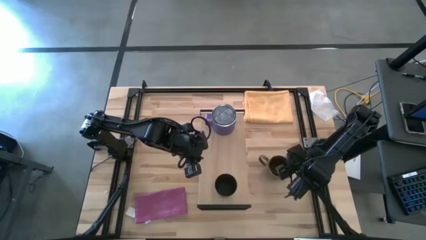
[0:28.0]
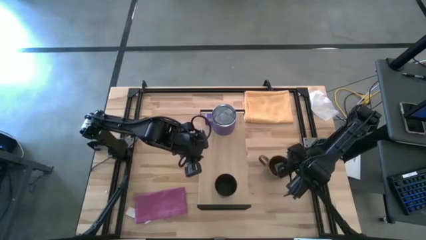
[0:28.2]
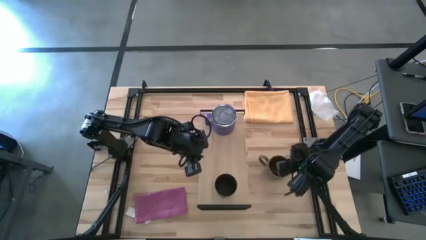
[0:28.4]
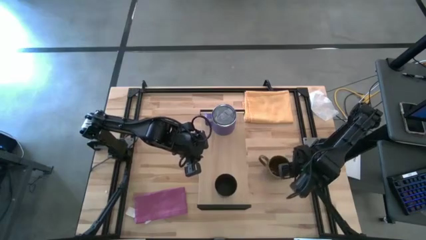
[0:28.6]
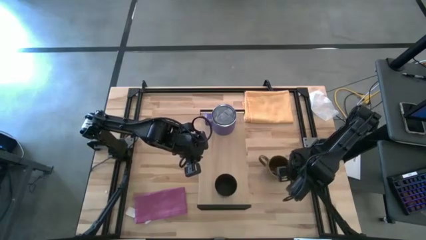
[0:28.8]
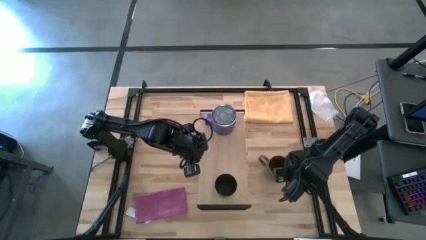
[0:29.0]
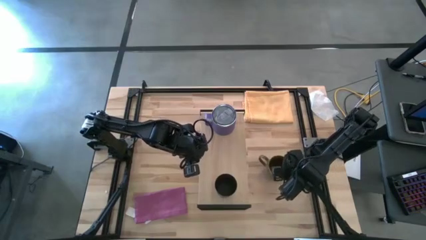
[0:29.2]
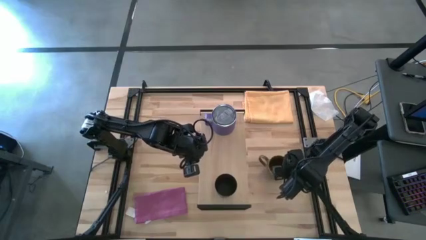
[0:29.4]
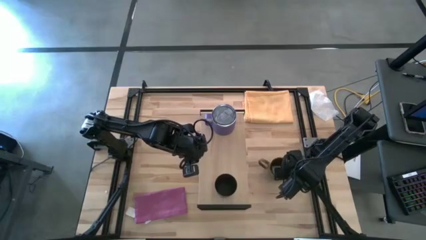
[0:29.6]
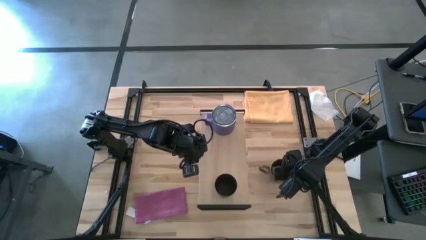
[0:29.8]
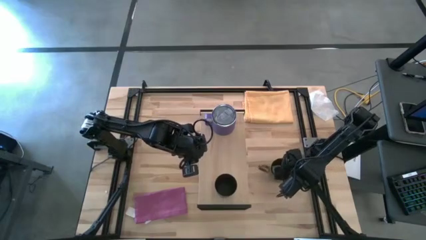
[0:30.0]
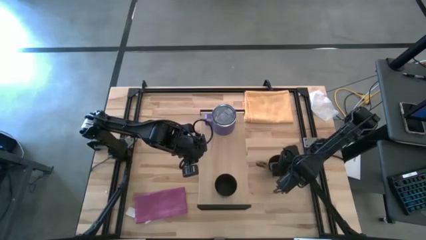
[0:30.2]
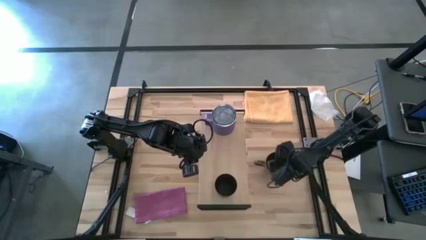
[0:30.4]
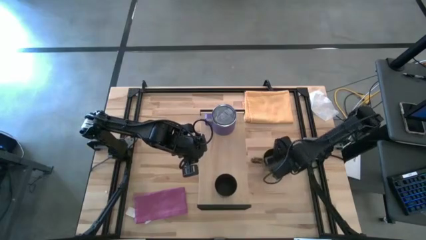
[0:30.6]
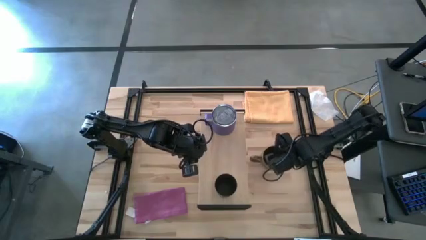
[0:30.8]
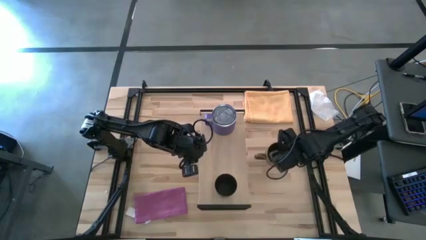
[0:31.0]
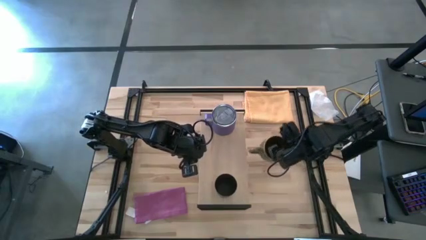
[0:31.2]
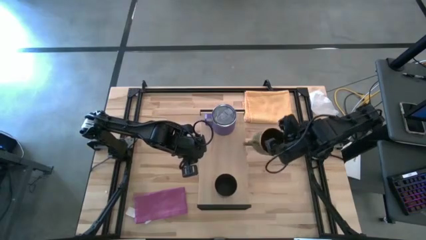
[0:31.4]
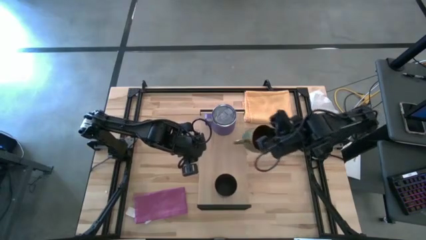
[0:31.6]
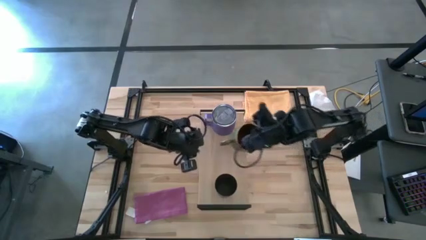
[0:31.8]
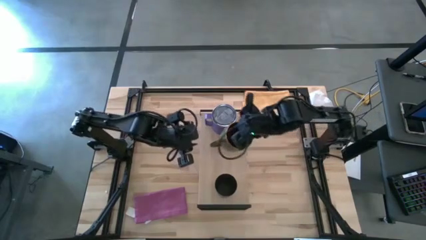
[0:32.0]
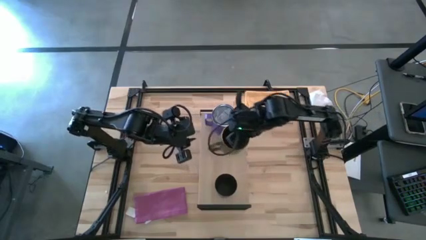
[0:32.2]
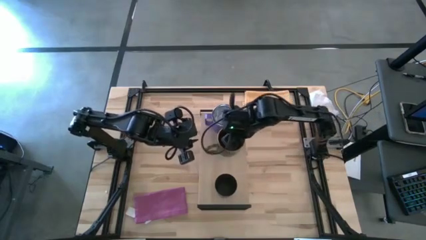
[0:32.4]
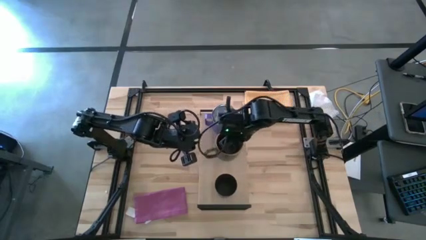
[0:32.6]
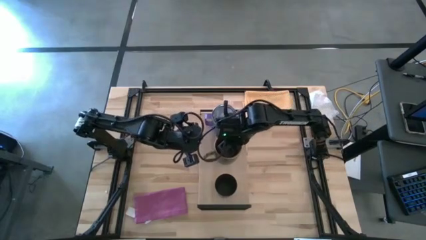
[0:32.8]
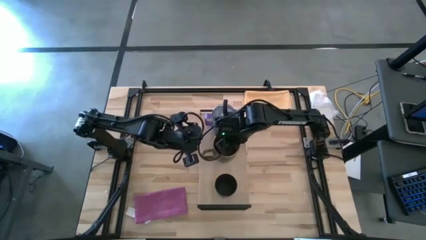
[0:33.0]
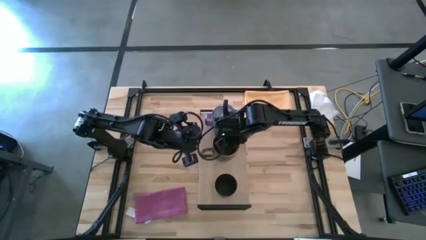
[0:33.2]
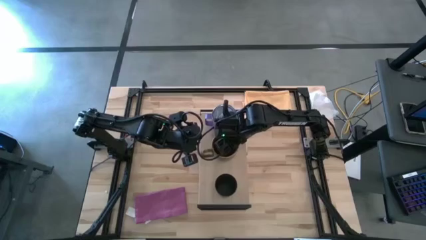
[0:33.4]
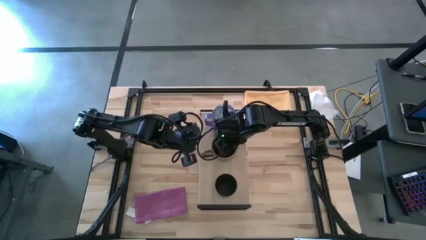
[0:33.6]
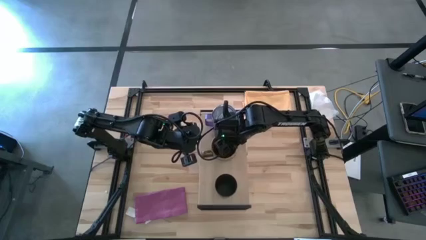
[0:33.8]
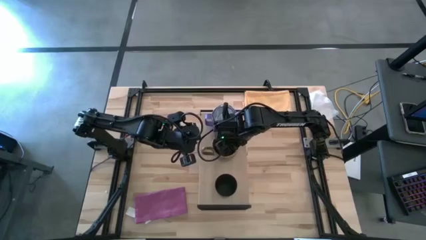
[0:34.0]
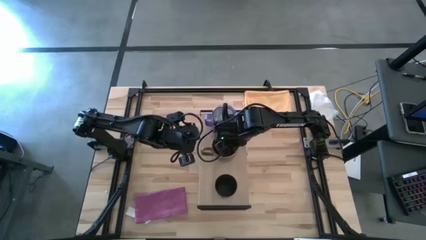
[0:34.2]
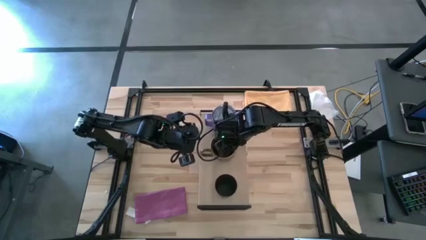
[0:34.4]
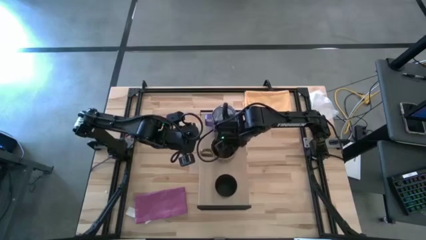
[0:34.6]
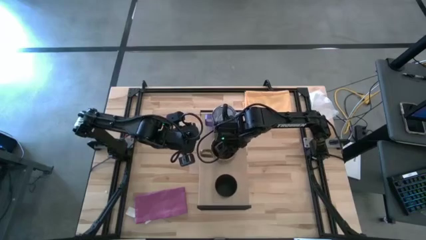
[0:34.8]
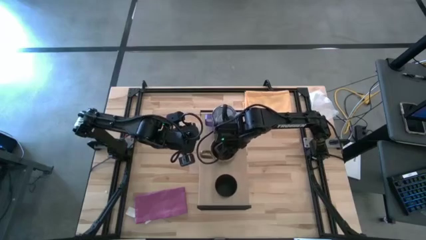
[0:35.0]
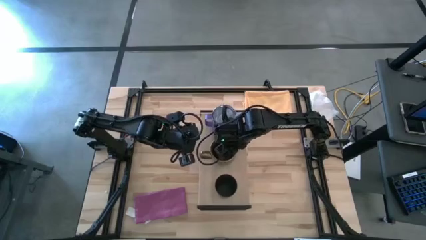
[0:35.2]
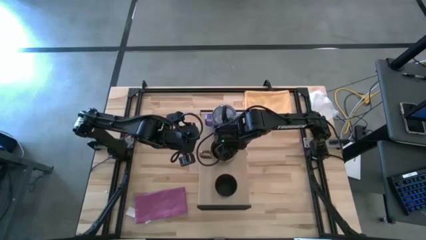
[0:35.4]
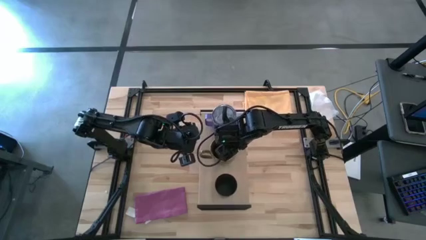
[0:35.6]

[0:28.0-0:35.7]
Task: Stack small to large cups/mugs on shelf
Put the green mug on the shelf

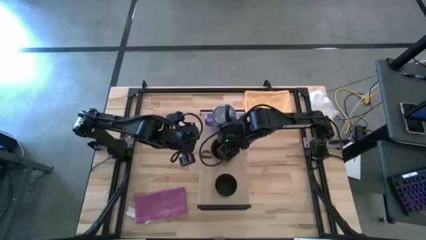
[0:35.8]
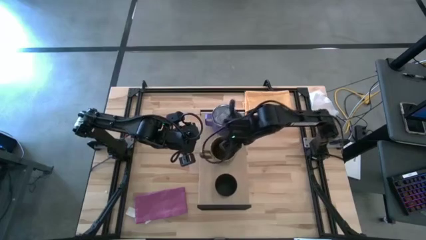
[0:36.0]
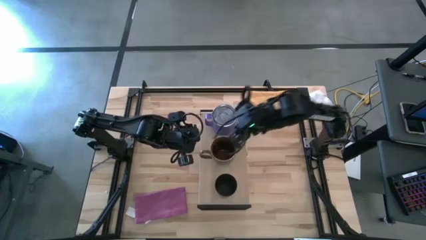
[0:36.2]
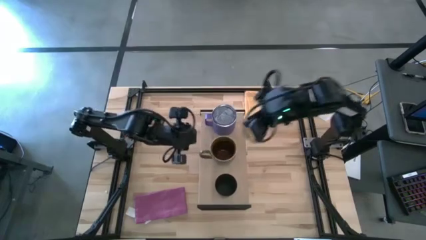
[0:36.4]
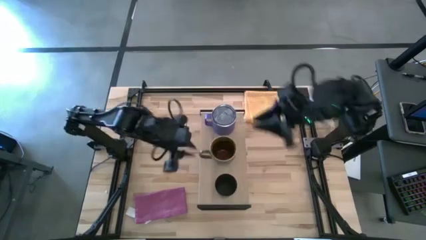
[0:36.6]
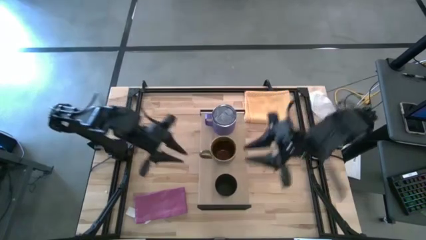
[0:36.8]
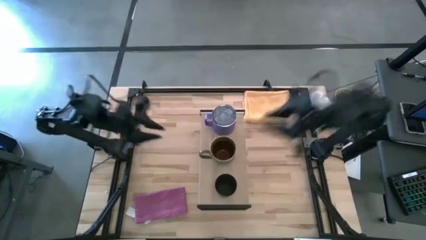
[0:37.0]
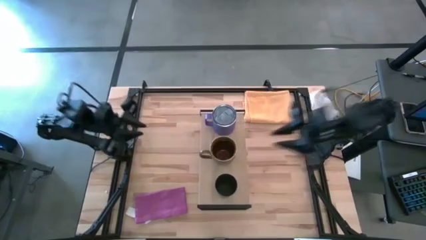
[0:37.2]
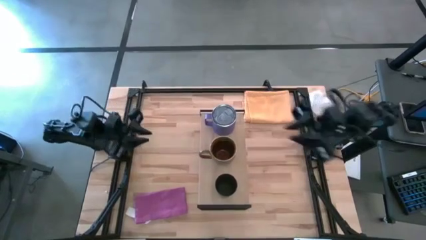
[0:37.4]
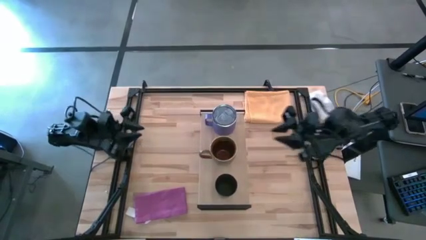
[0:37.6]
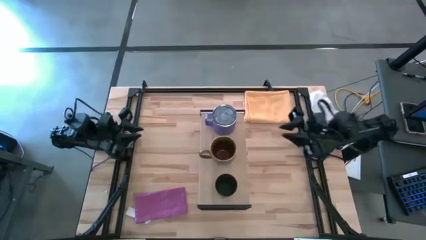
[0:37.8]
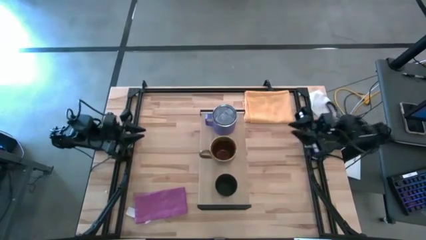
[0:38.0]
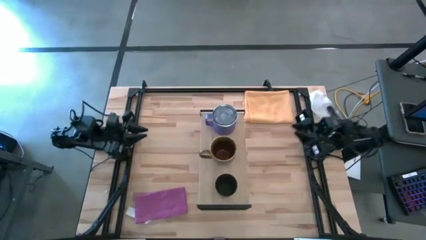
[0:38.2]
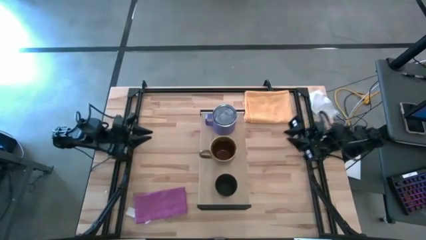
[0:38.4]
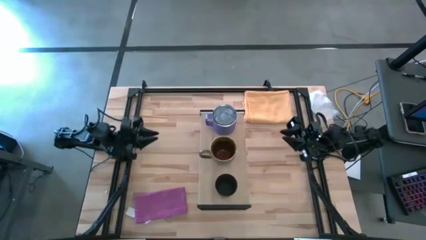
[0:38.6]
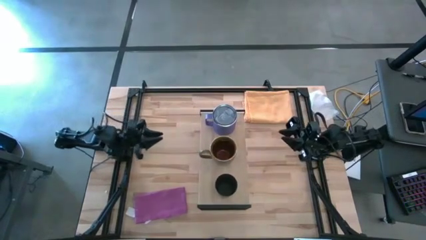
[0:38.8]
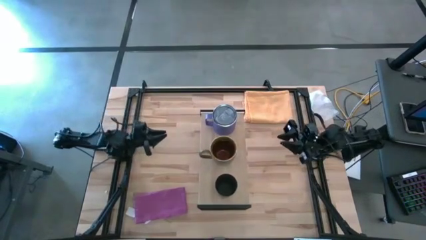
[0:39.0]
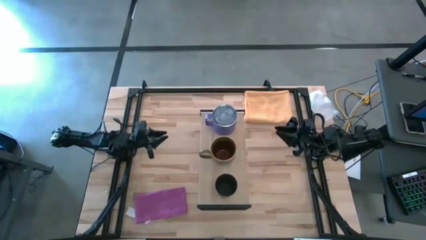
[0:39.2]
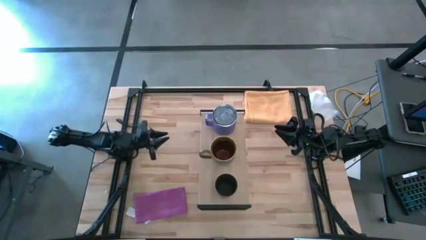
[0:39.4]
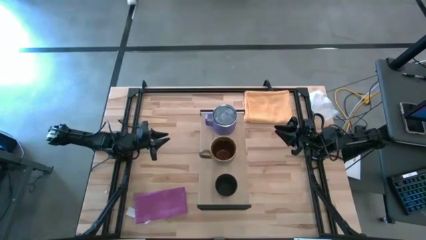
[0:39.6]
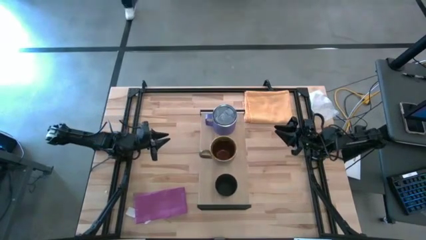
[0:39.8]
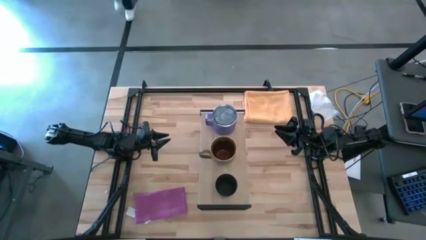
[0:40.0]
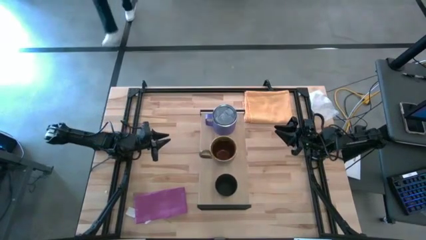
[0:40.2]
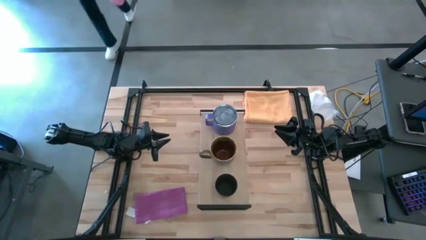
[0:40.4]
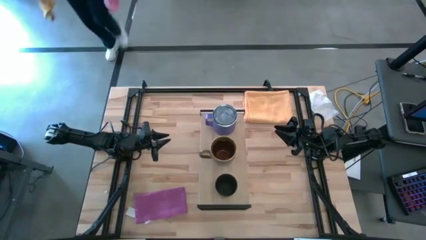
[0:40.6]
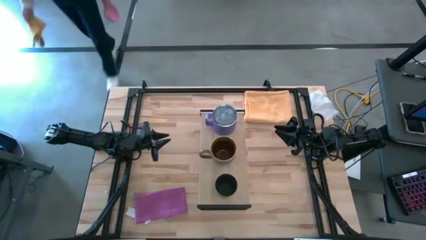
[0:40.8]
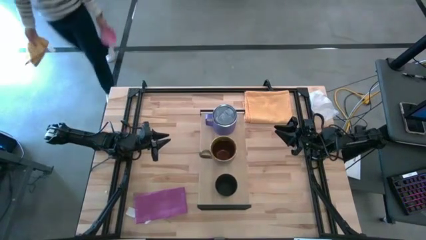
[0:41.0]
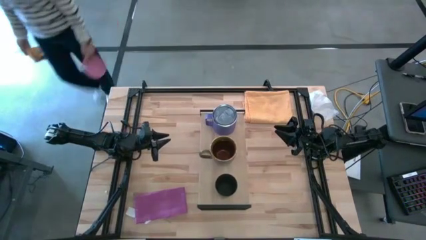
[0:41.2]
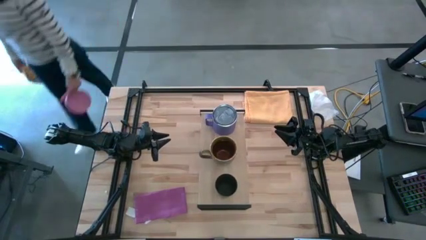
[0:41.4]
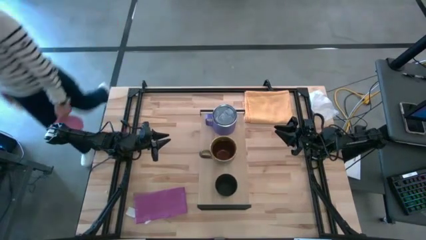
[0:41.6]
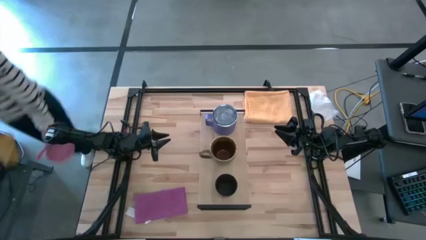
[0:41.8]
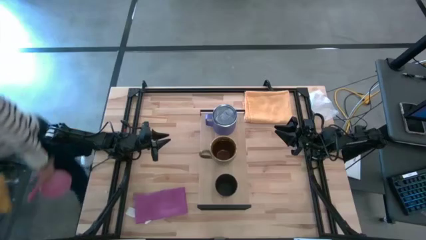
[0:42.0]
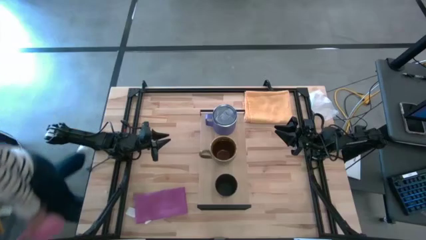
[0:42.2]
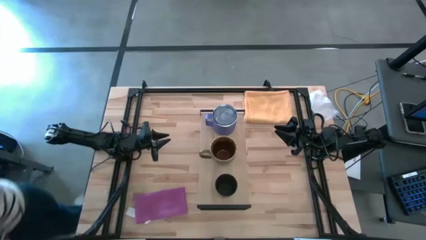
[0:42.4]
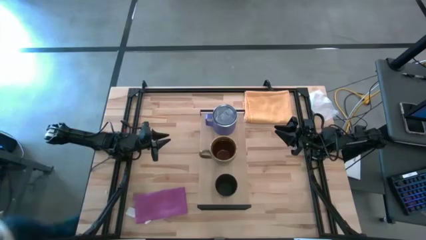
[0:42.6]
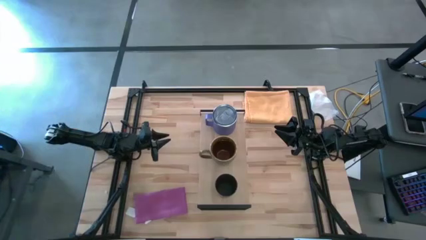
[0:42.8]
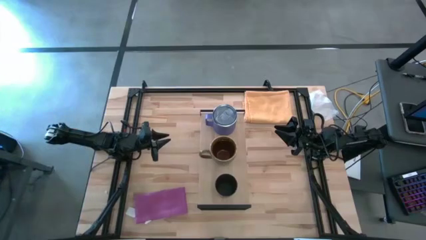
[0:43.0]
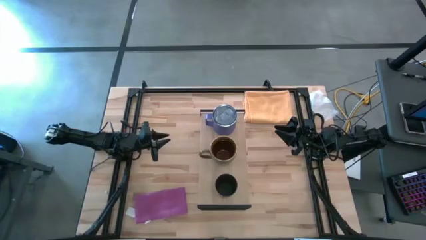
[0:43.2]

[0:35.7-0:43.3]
Return to Home Position
